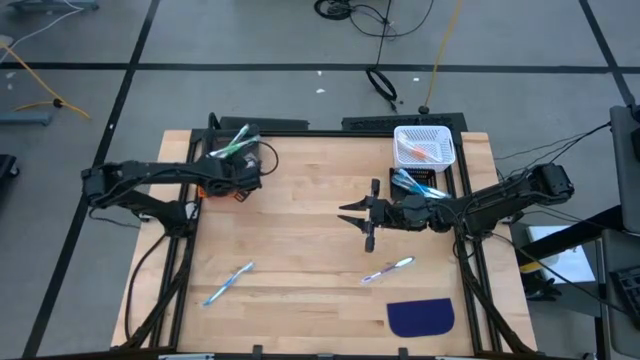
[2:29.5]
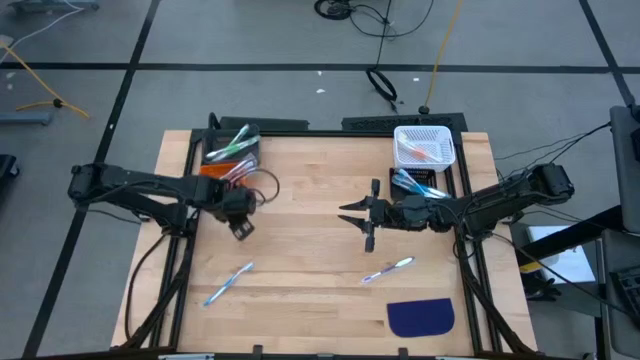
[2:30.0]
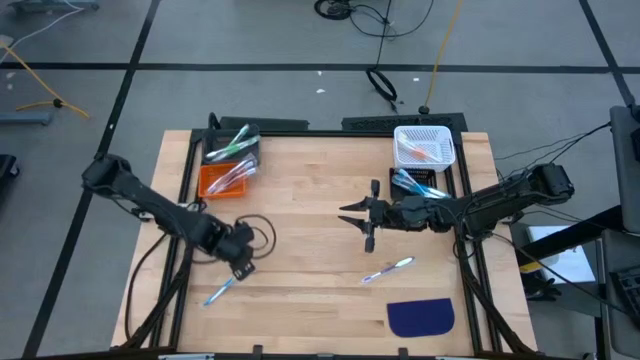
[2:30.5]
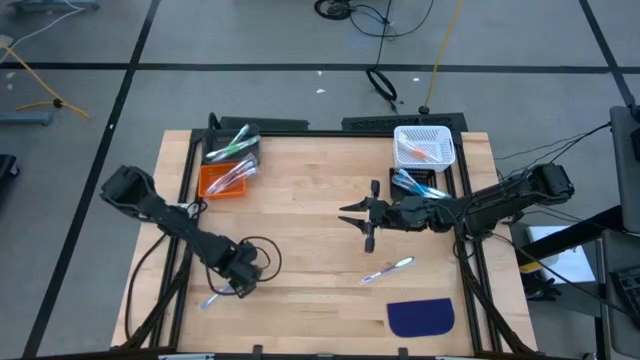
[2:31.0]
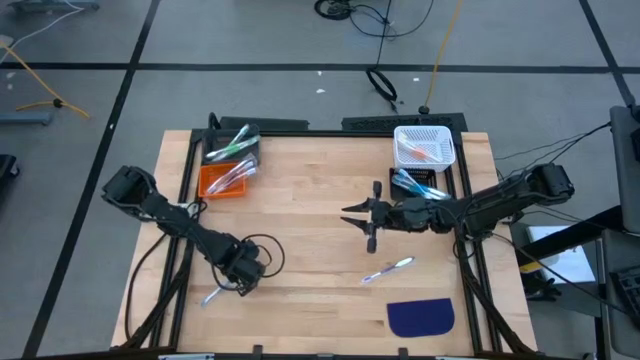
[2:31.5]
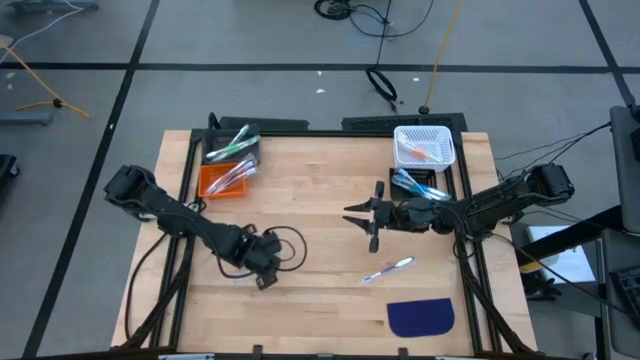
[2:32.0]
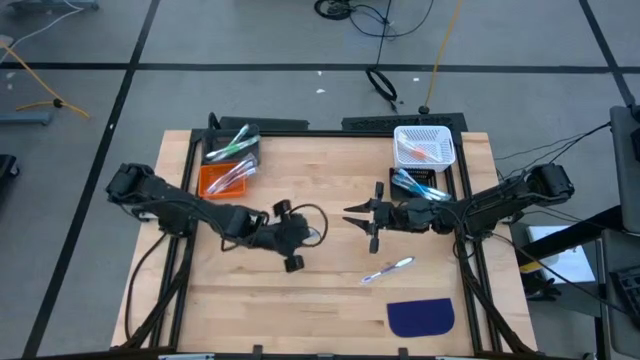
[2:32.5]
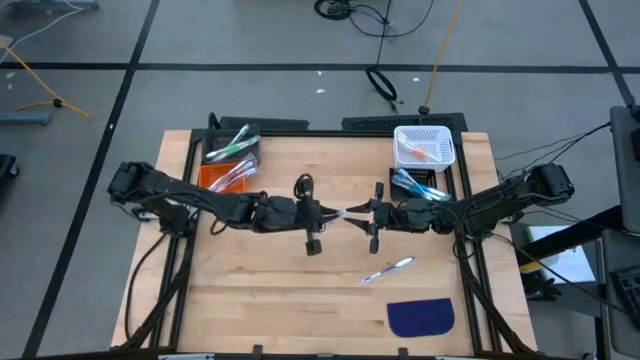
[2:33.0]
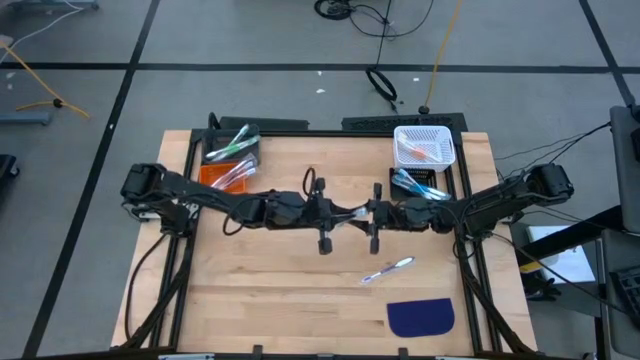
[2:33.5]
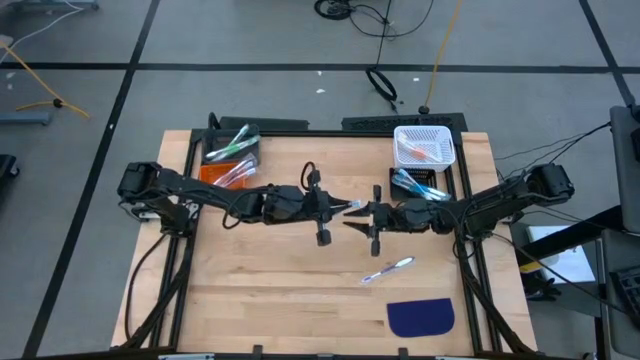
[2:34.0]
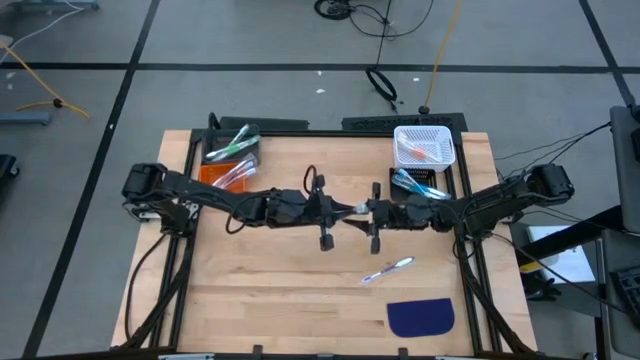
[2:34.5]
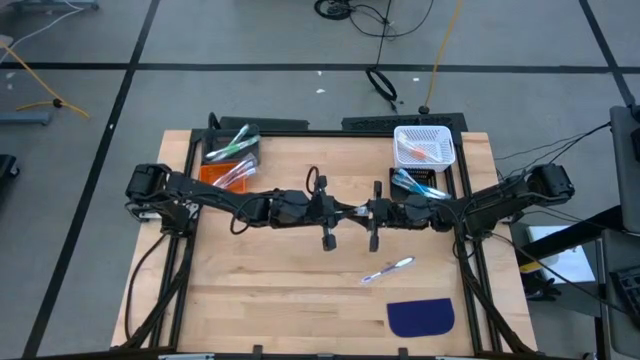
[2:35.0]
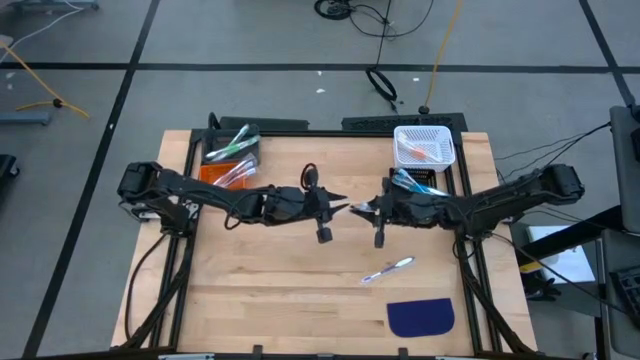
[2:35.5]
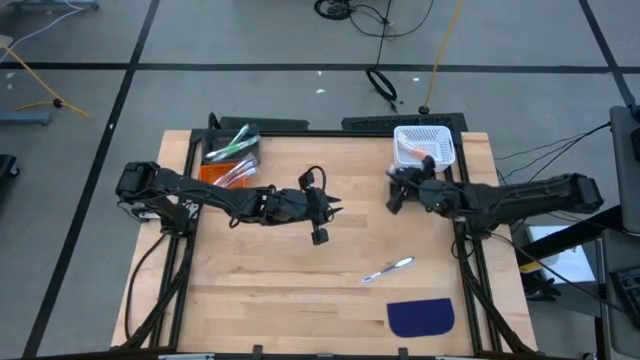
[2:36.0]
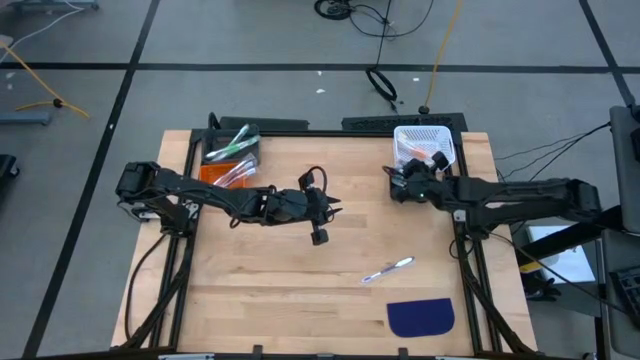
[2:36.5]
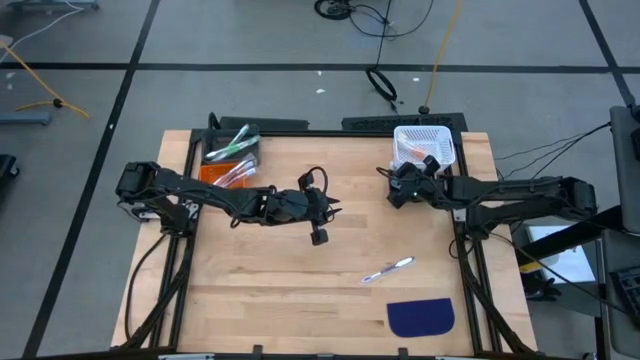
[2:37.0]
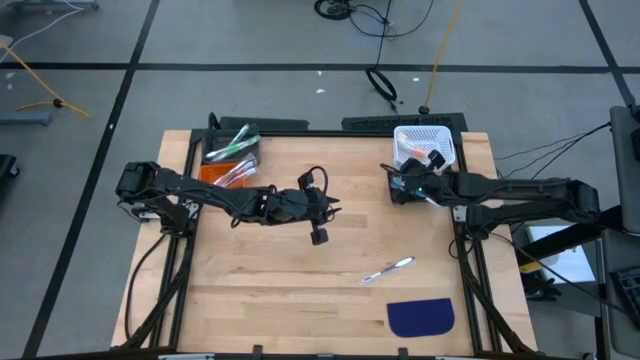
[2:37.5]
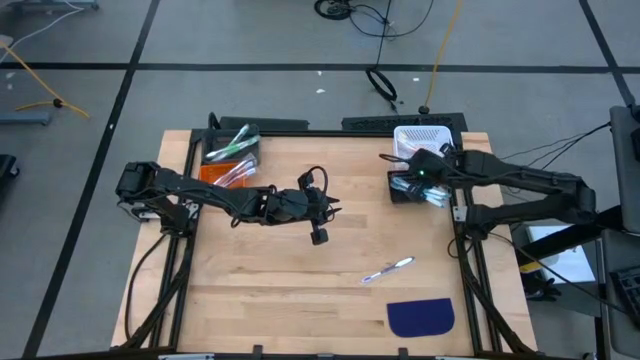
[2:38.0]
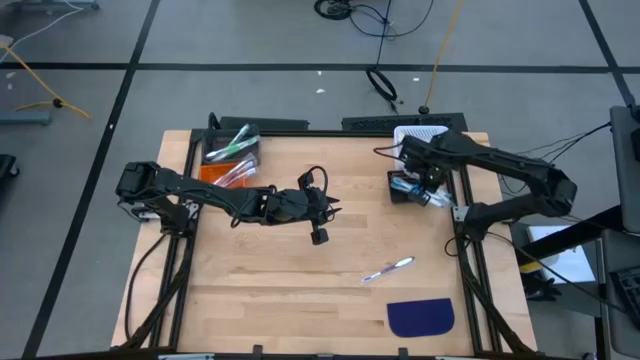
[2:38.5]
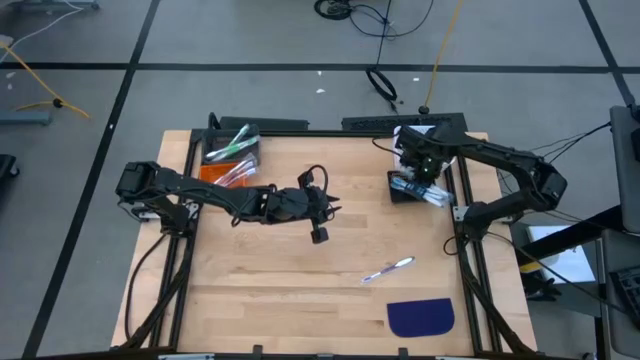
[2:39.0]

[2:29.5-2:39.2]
Task: Pick & Place Toothbrushes
Put the blue toothbrush into the black bin

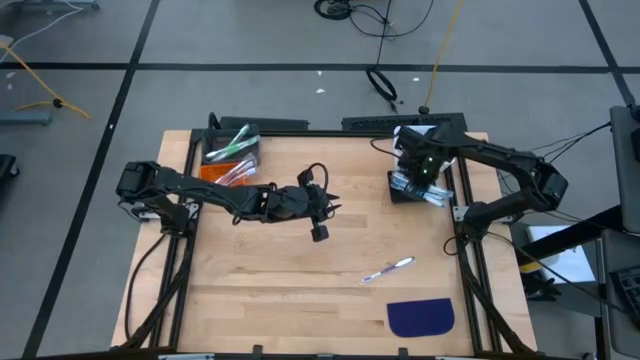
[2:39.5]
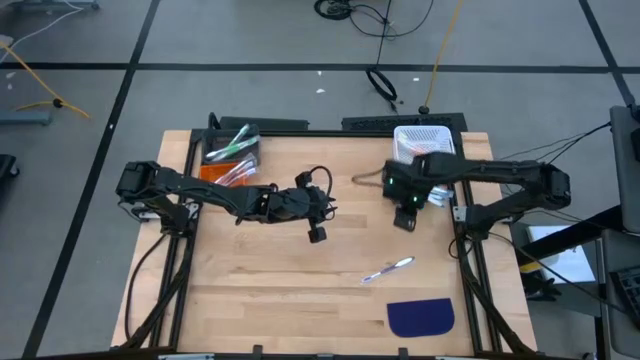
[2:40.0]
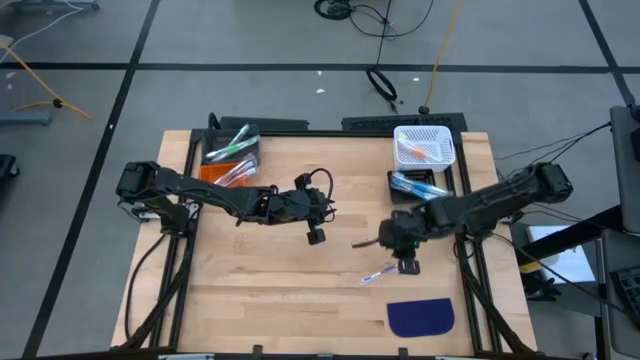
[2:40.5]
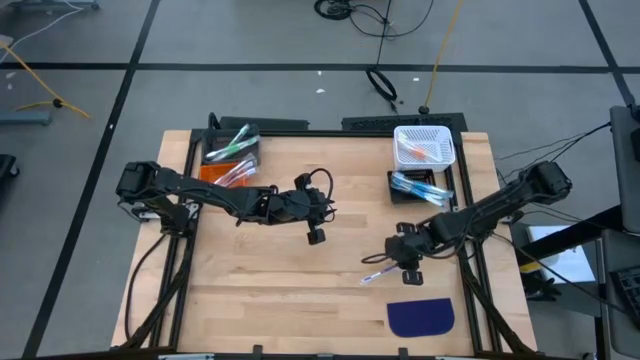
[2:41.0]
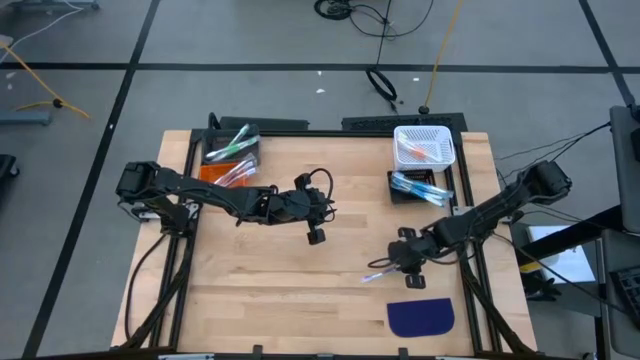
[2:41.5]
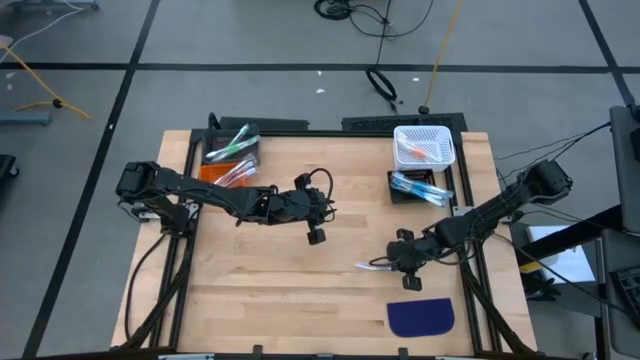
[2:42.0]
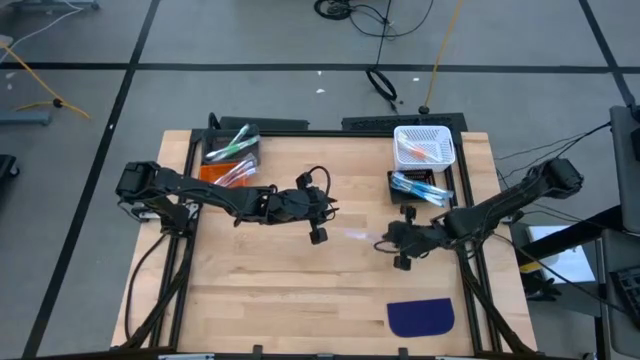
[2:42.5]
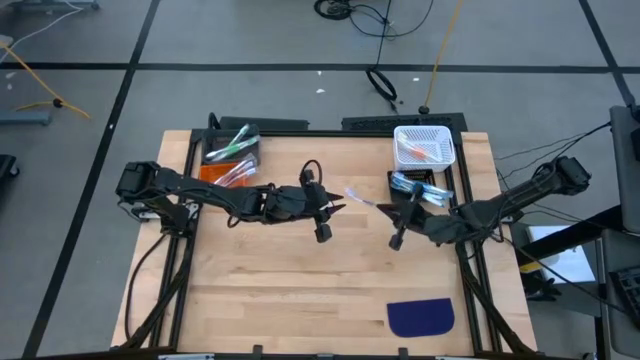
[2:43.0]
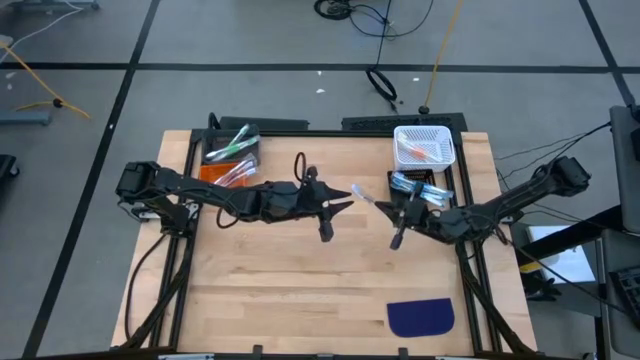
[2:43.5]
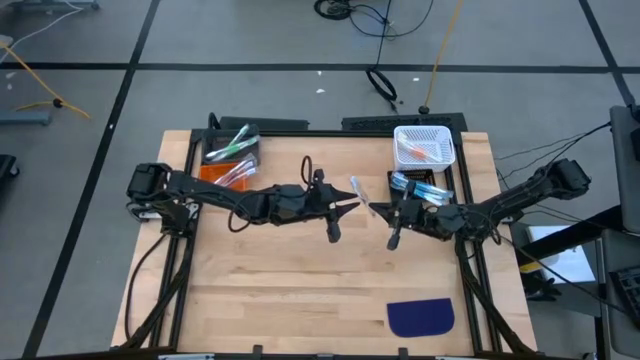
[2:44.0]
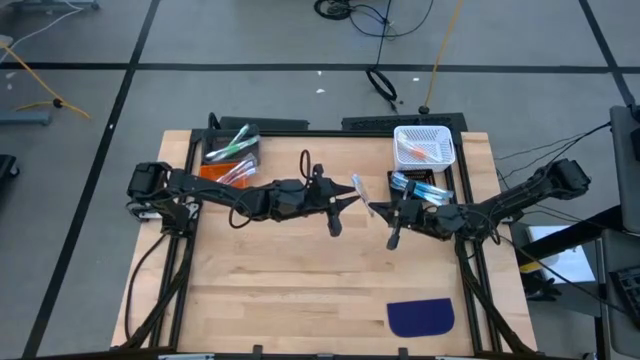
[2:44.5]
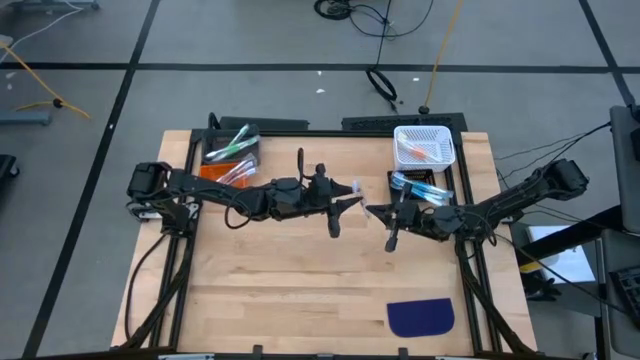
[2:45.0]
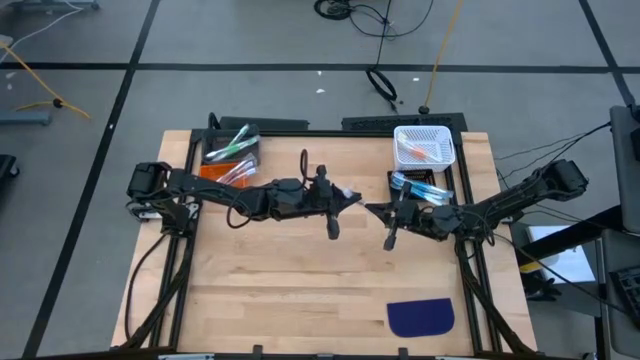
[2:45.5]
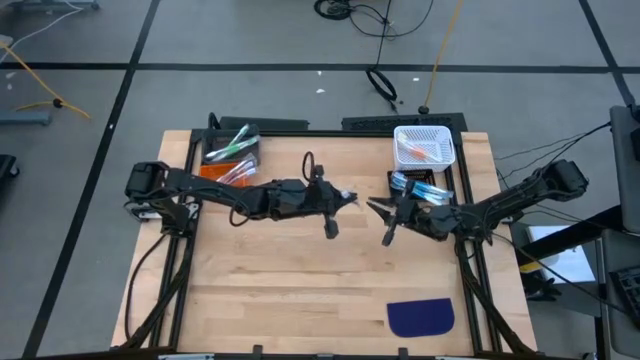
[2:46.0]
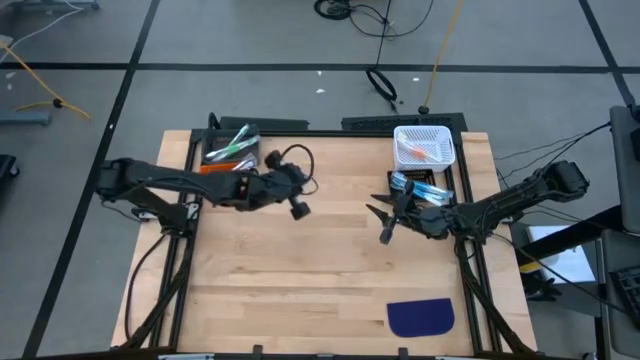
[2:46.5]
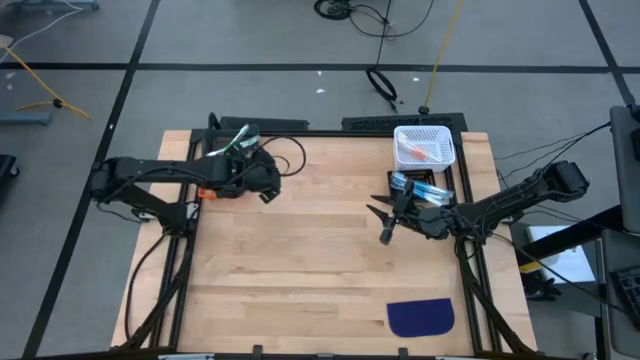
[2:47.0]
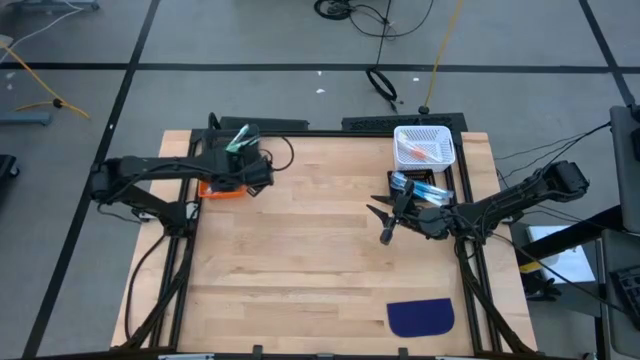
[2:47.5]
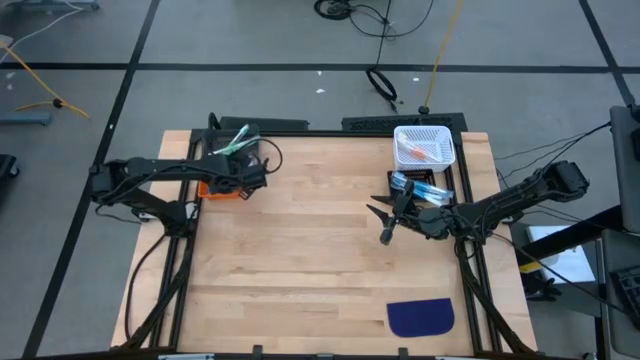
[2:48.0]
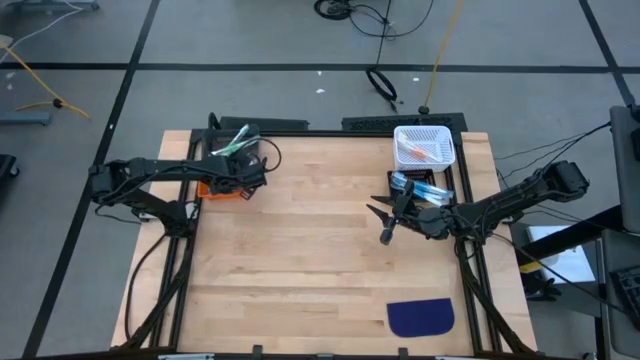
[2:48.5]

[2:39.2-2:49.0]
Put the purple toothbrush in the orange bin

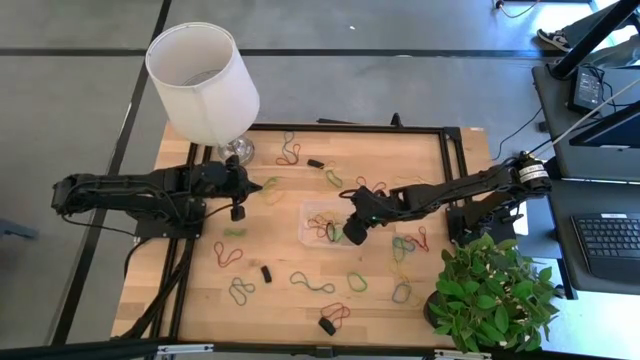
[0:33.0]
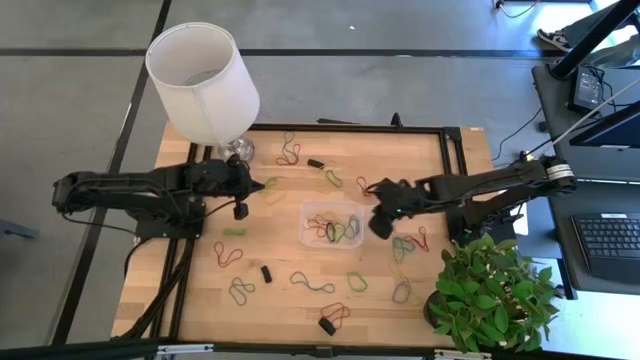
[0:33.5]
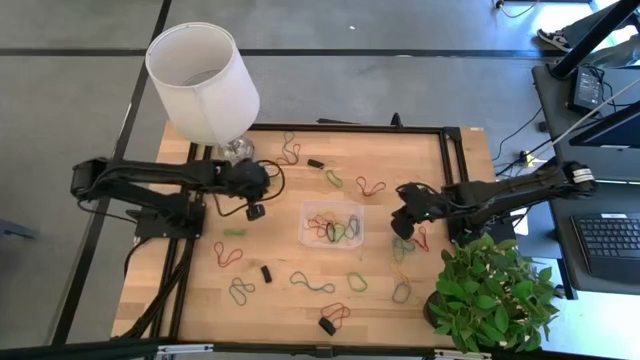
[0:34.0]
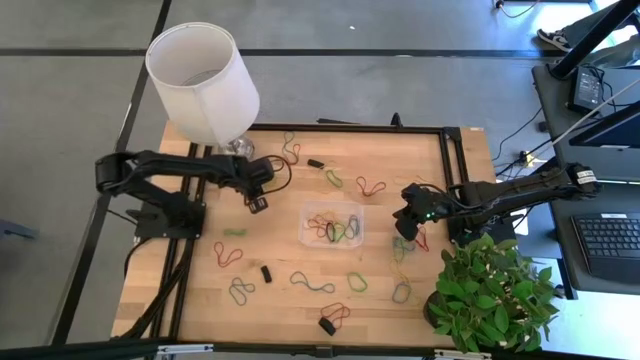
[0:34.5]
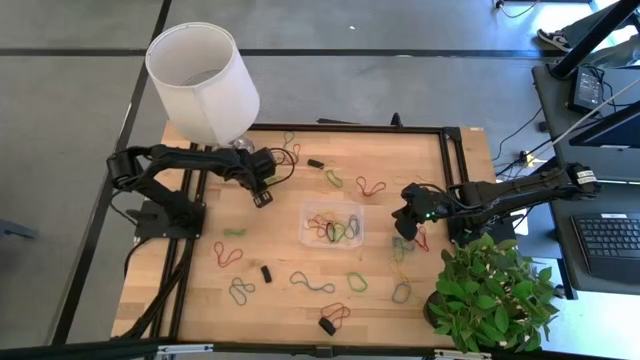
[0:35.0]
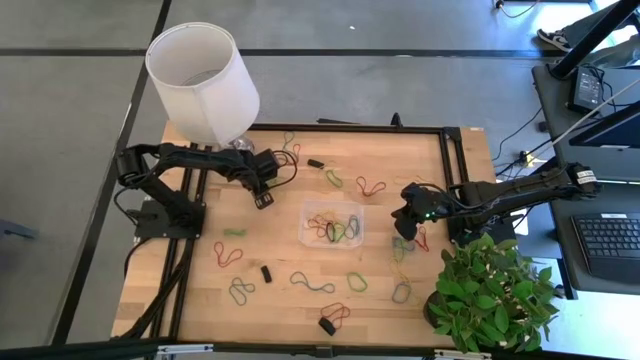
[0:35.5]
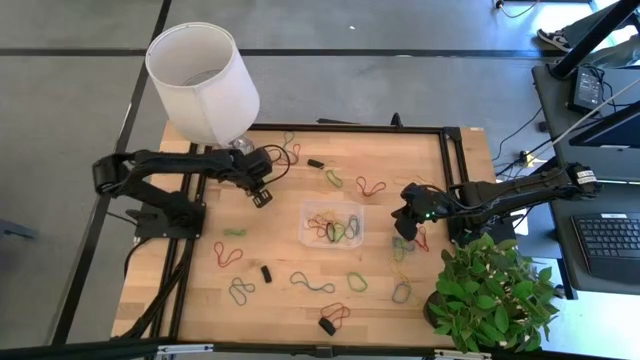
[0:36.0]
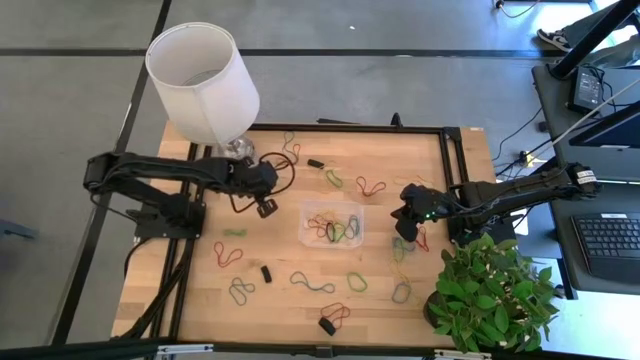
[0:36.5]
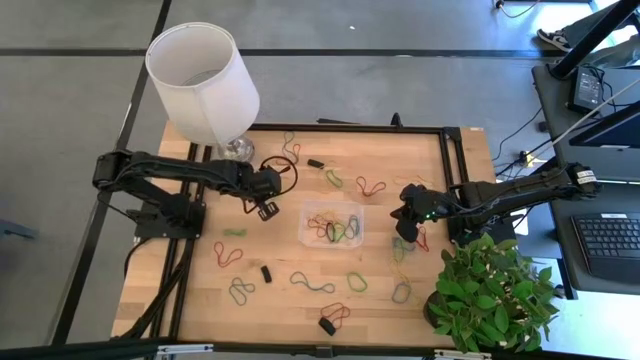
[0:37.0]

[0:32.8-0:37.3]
Task: Pick and place rubber bands into bin
Put the green rubber band into the transparent bin
